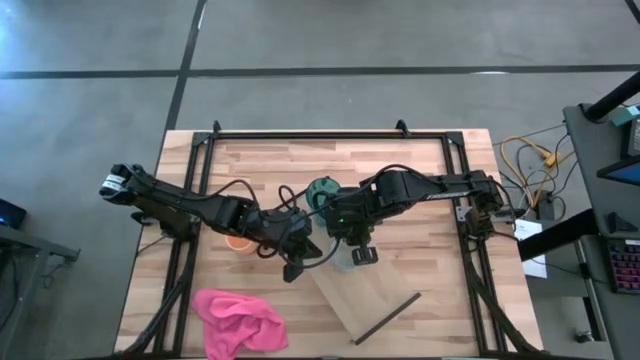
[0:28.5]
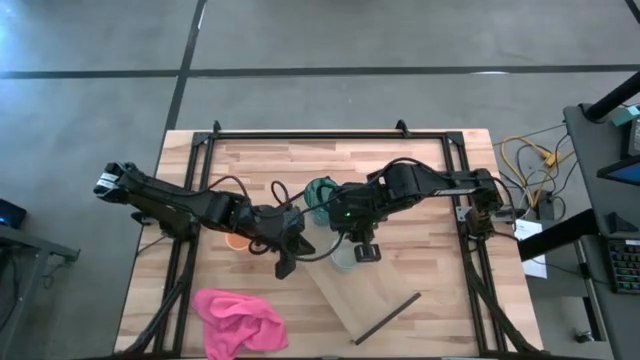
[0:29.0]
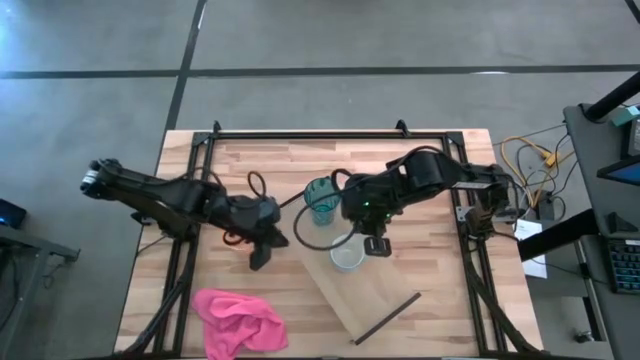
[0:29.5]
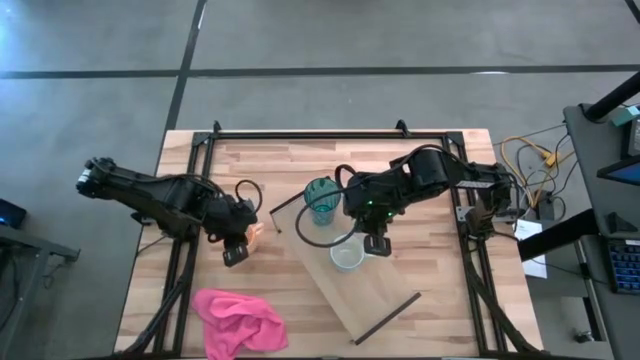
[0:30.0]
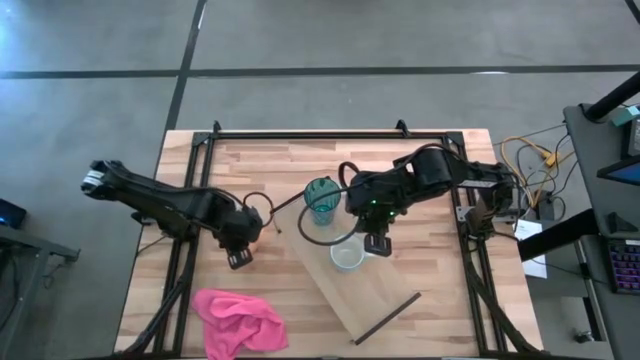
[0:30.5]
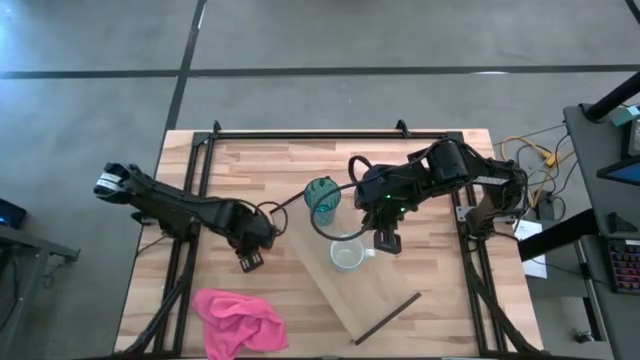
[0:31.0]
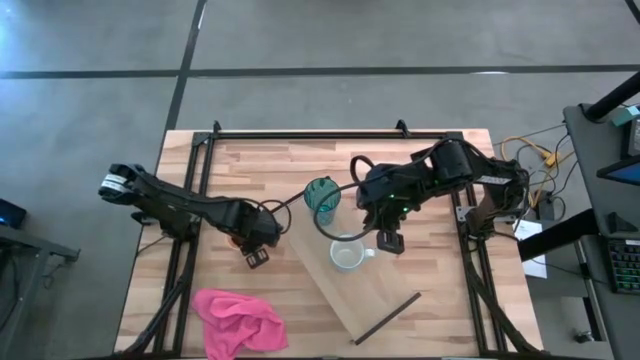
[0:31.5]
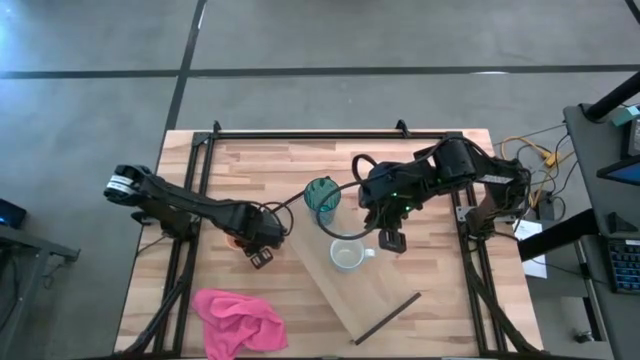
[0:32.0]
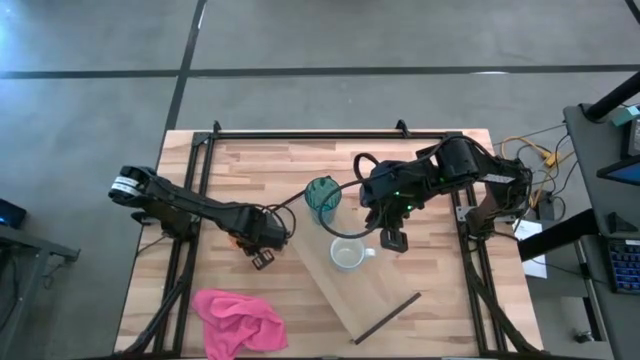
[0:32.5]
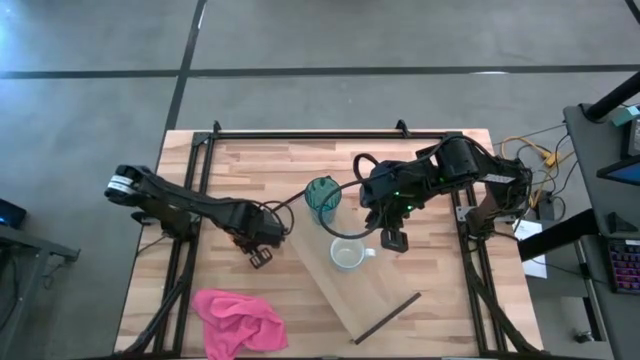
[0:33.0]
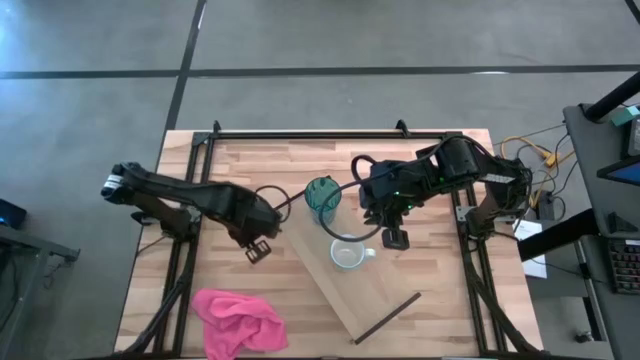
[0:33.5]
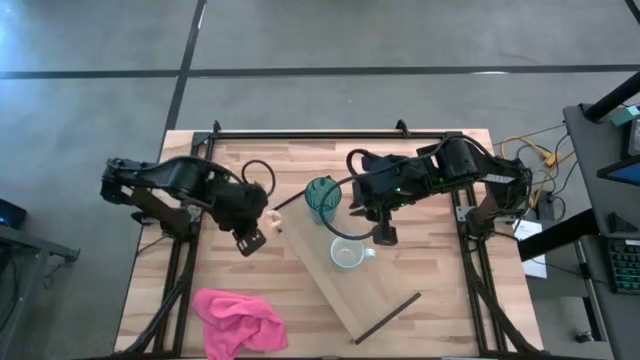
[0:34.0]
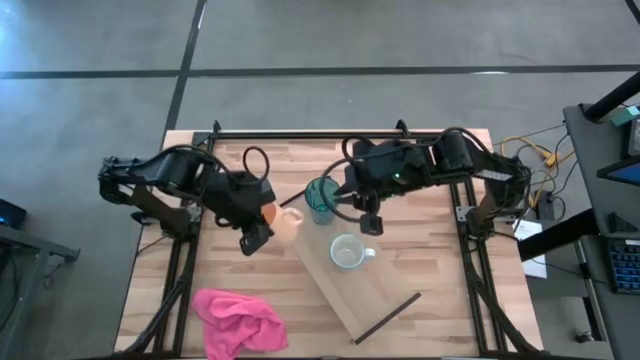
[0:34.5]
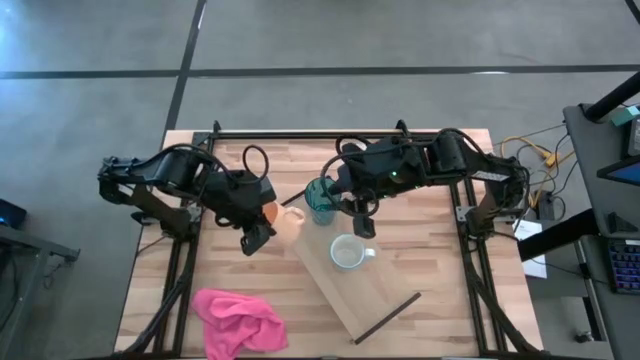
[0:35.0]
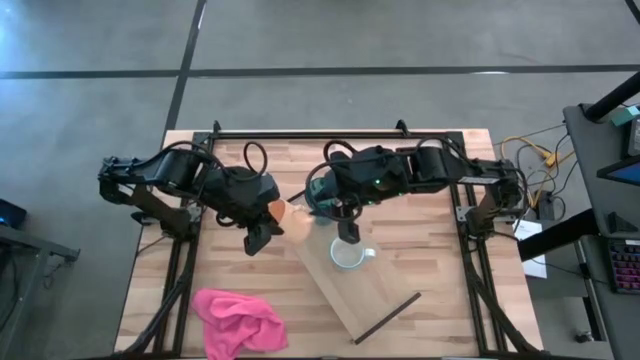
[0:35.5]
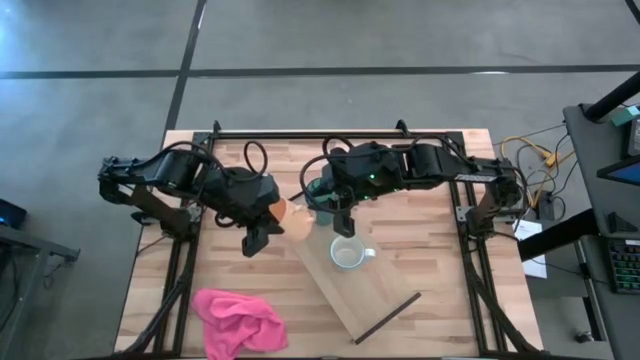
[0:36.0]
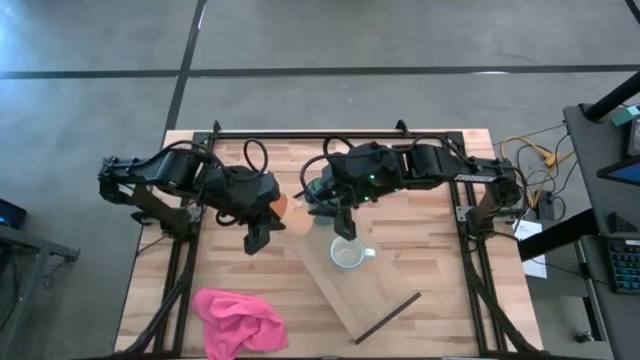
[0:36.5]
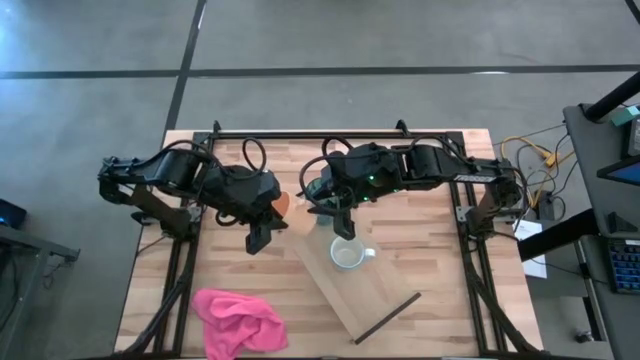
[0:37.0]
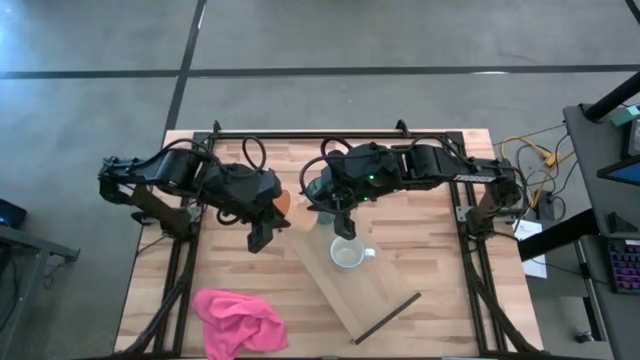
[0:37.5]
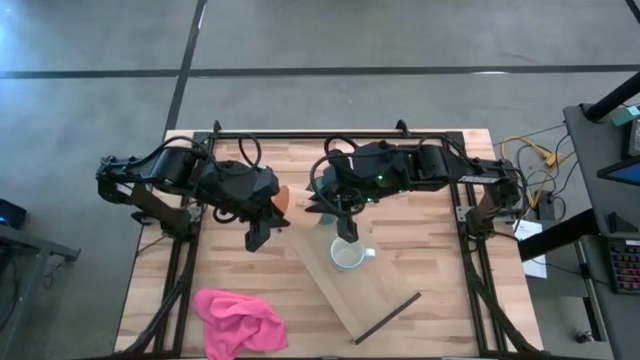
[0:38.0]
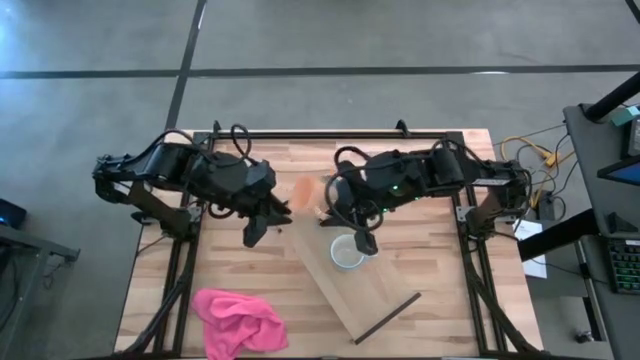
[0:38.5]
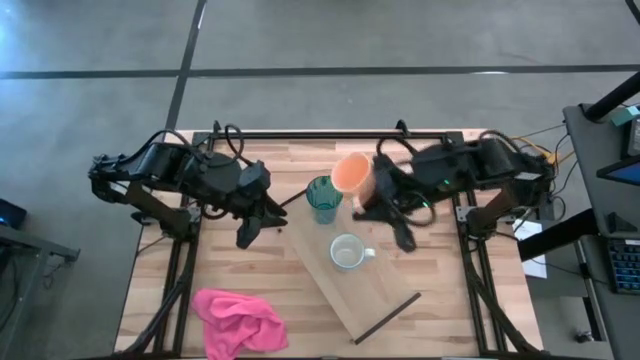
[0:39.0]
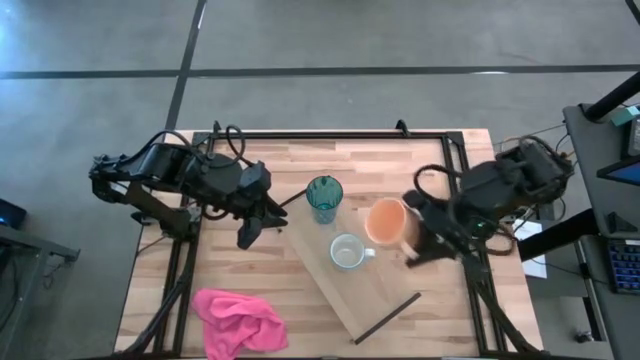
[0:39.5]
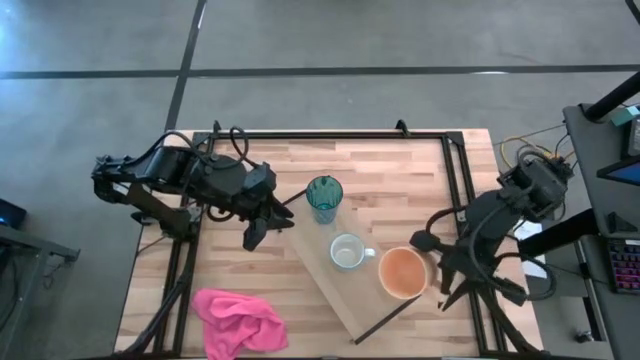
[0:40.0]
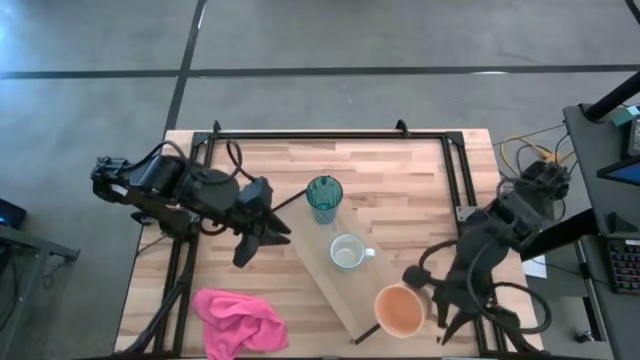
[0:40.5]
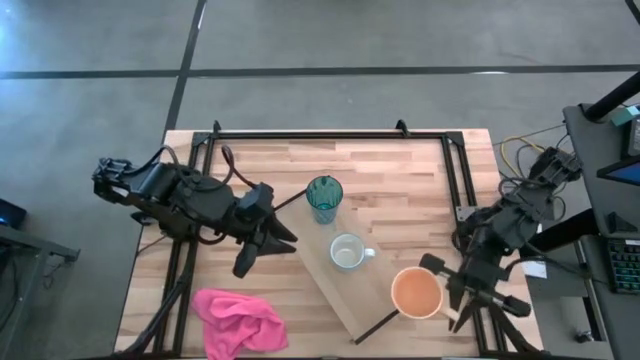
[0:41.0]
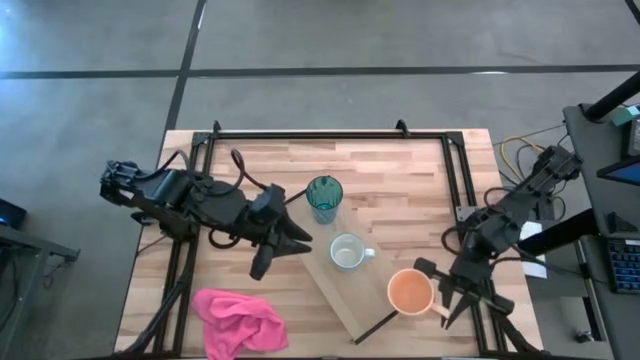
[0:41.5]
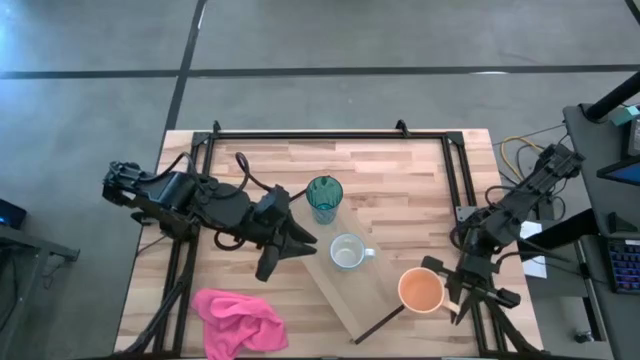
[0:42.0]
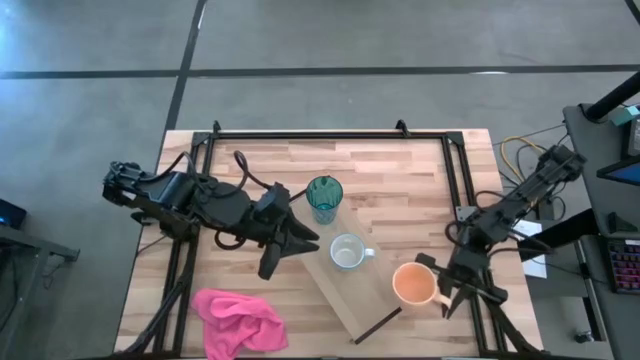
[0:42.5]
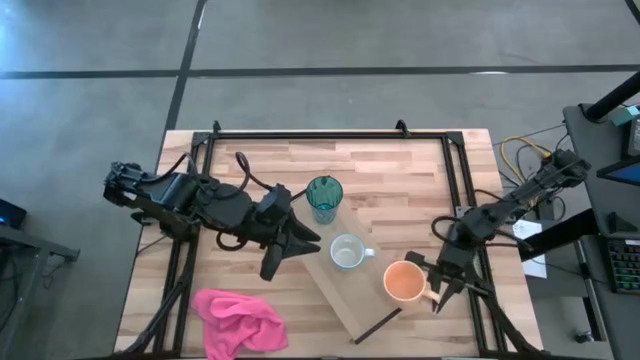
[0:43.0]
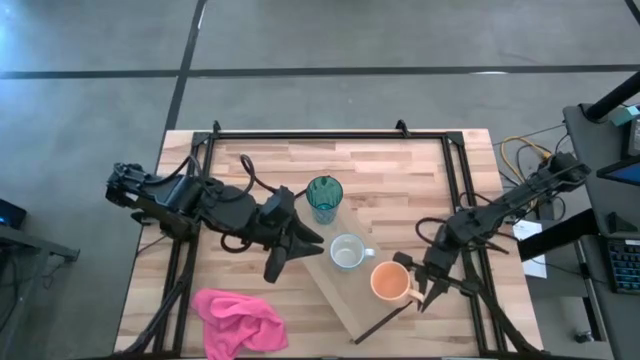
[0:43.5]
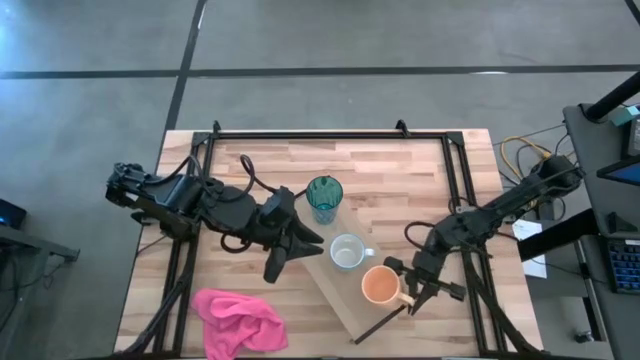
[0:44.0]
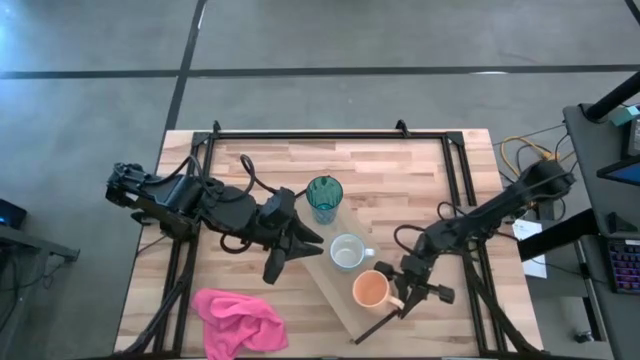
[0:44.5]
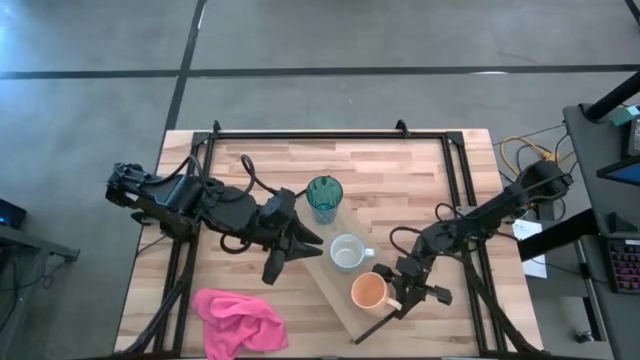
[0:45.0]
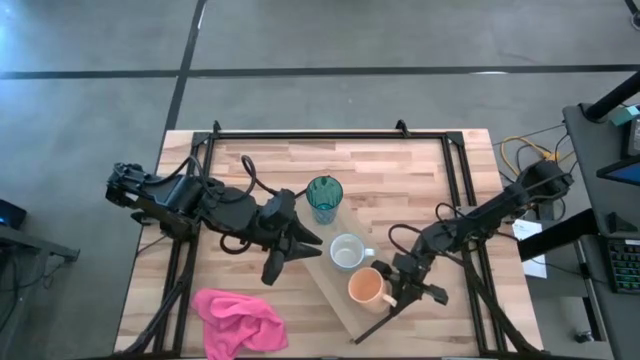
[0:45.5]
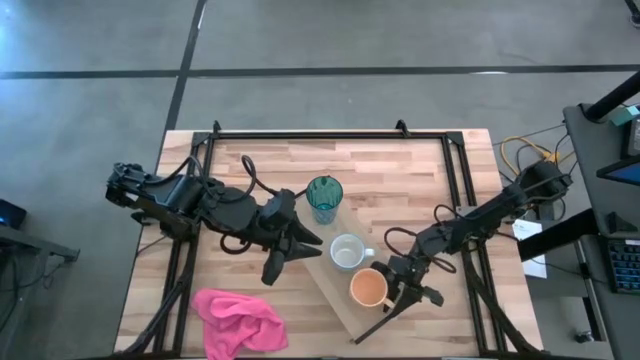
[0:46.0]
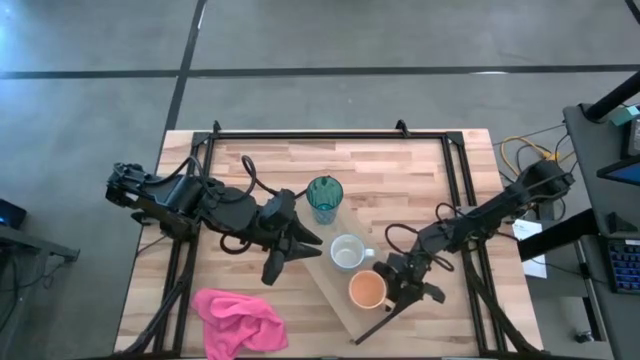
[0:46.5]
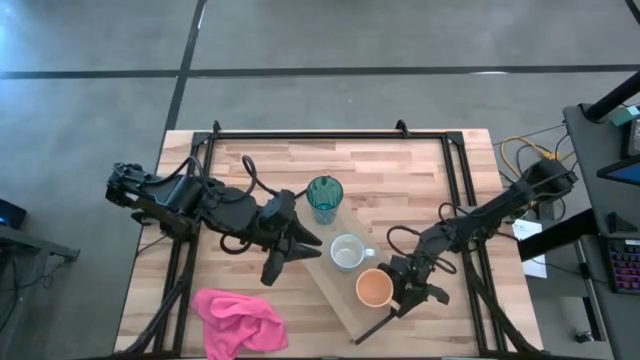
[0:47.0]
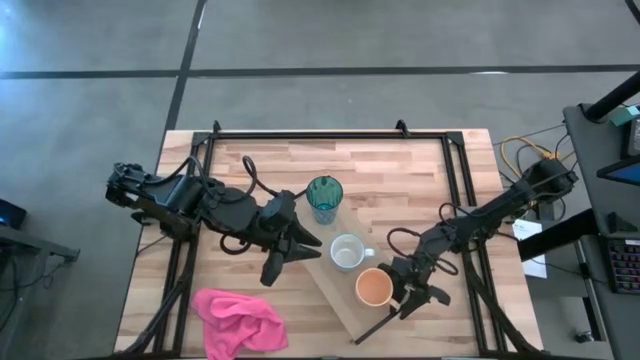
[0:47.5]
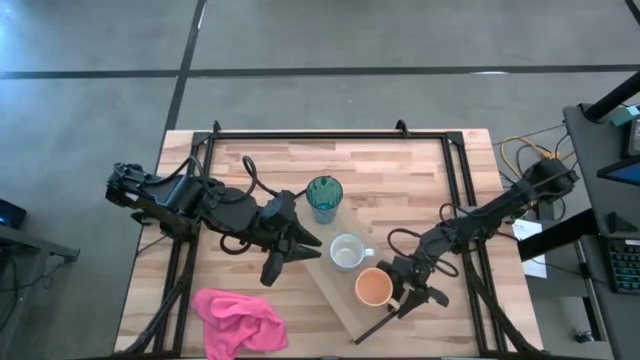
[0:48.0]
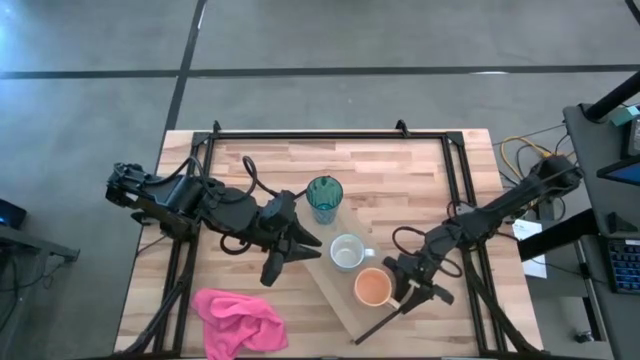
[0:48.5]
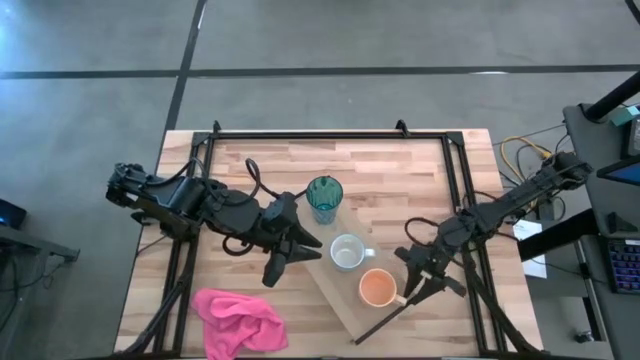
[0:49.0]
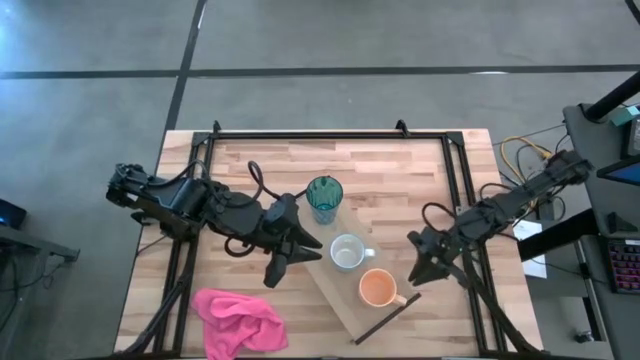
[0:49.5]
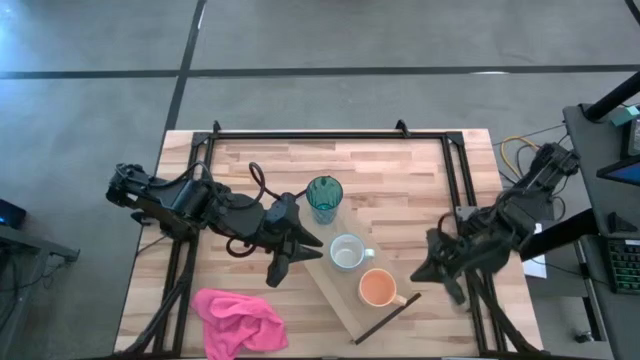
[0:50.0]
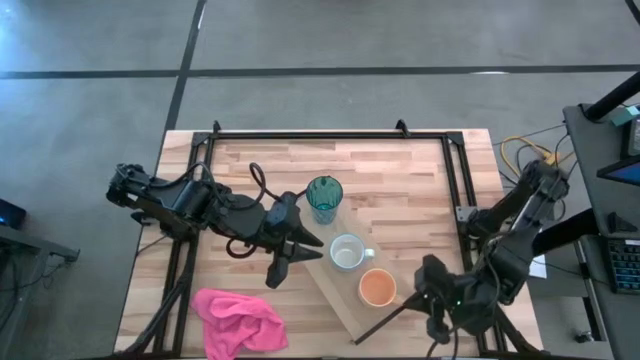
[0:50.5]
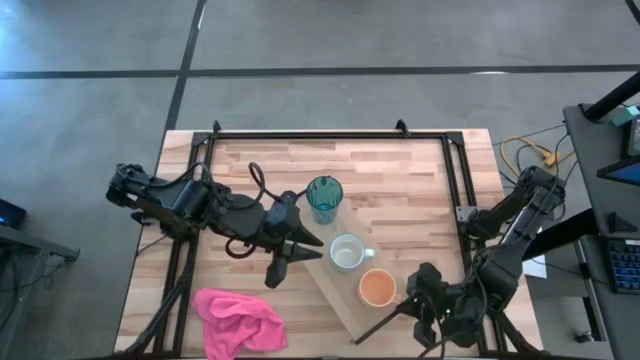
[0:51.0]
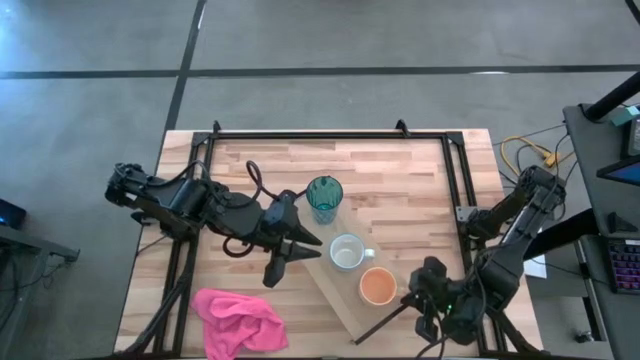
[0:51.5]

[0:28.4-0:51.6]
Task: Stack small to large cups/mugs on shelf
Put the yellow mug on the shelf
